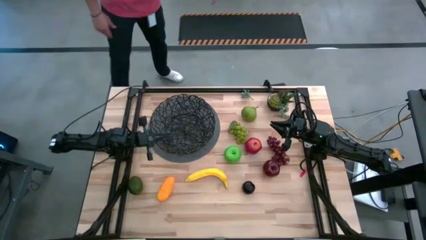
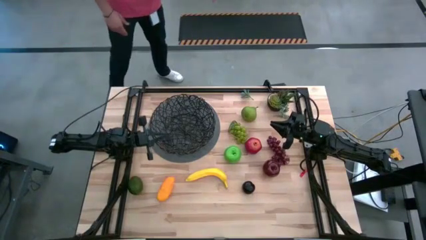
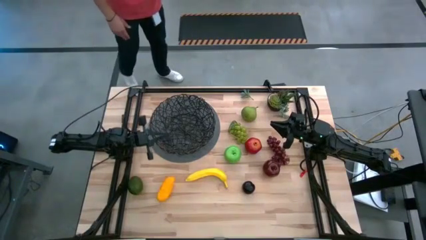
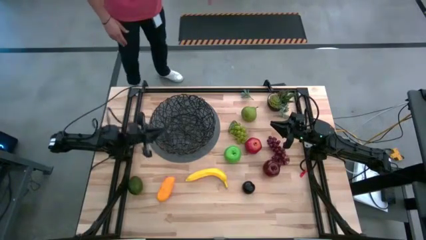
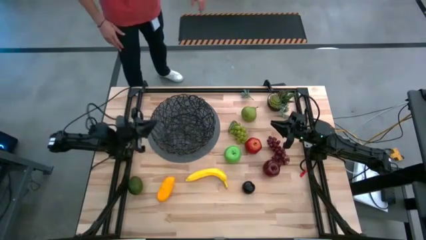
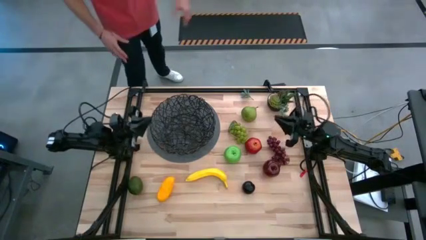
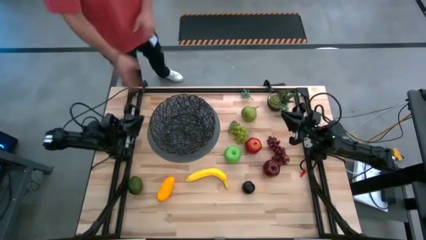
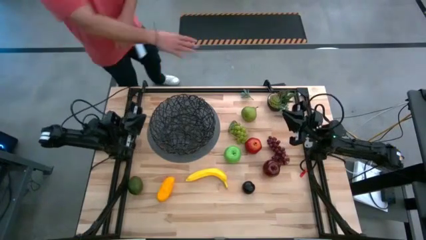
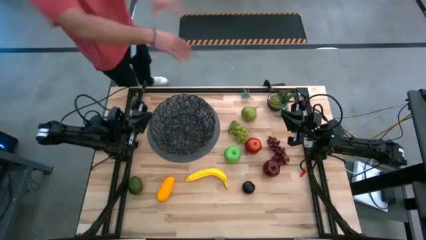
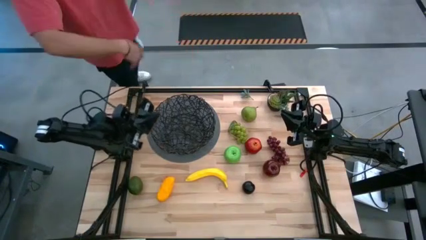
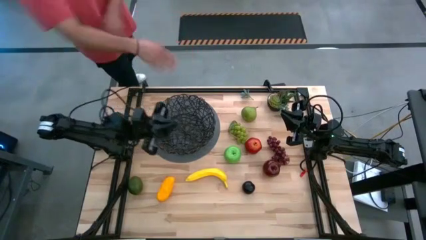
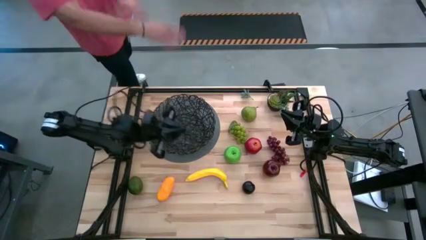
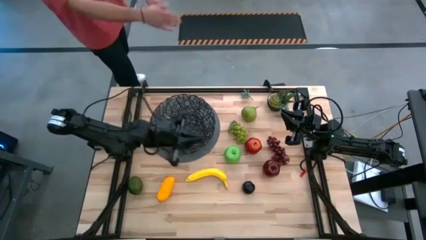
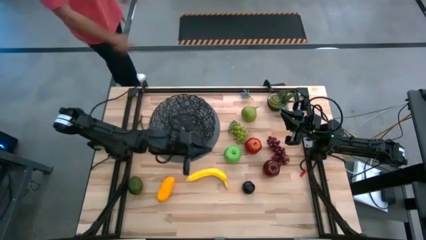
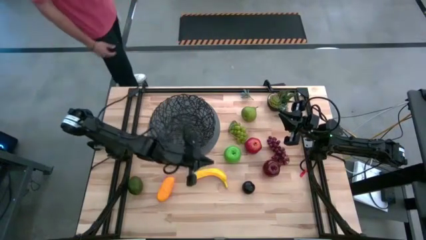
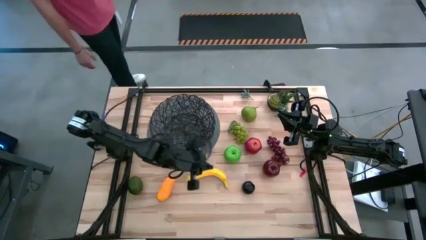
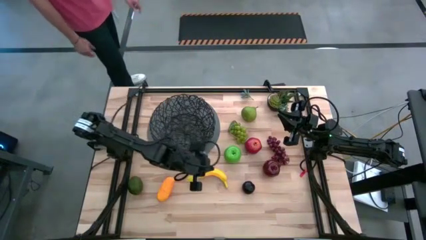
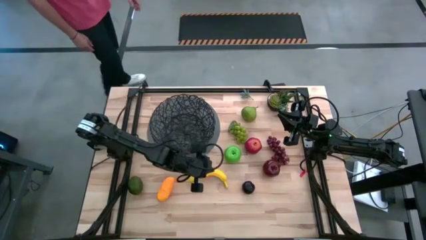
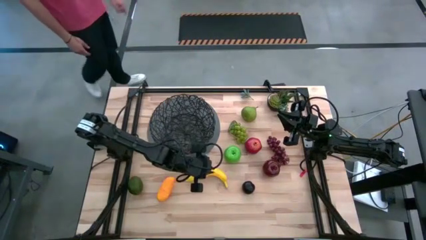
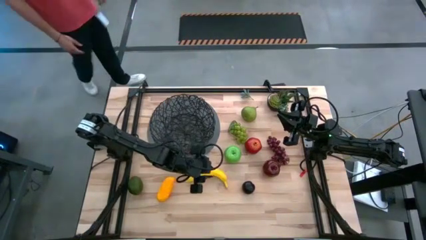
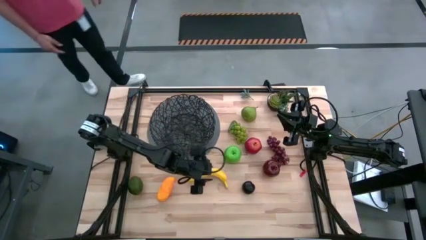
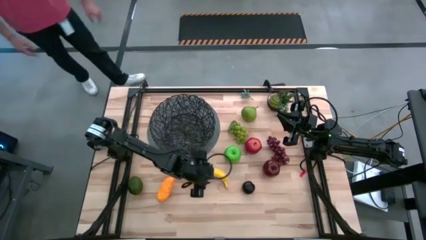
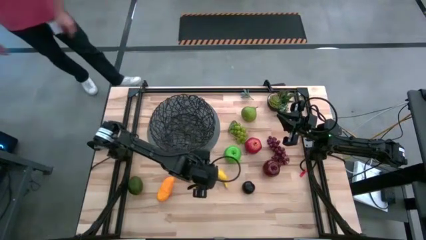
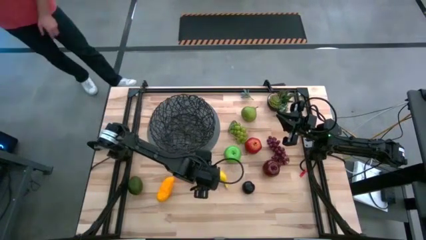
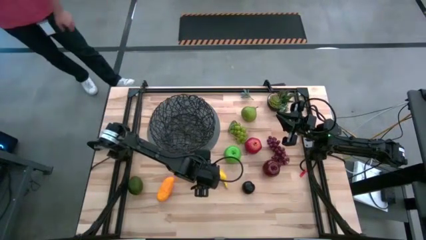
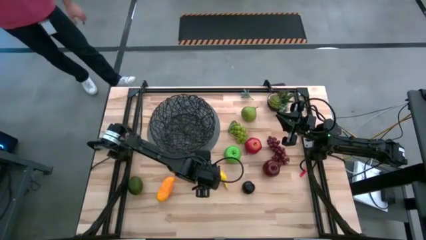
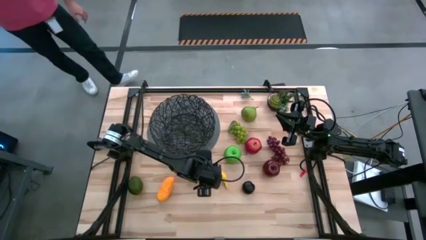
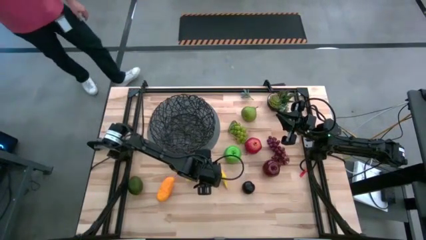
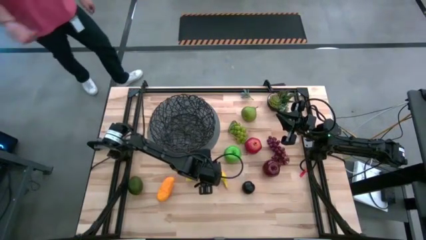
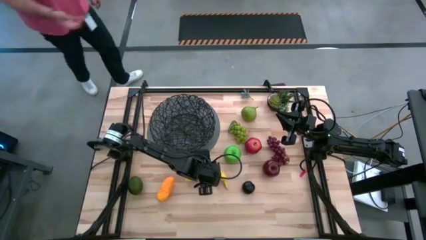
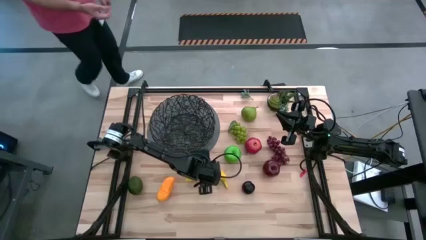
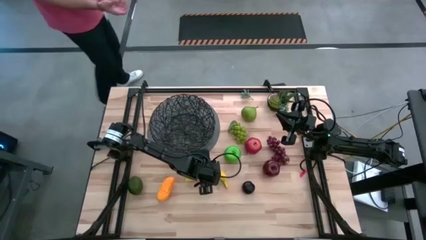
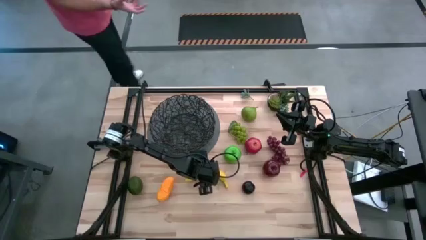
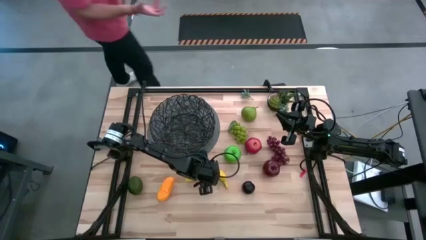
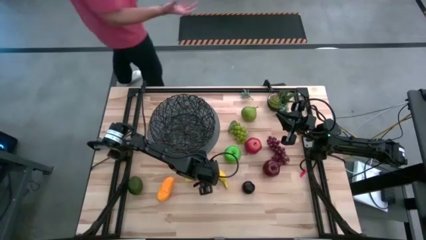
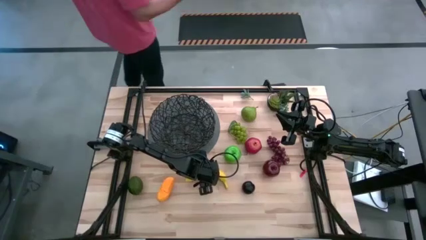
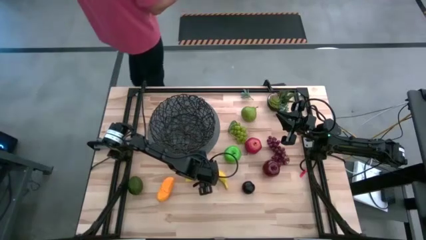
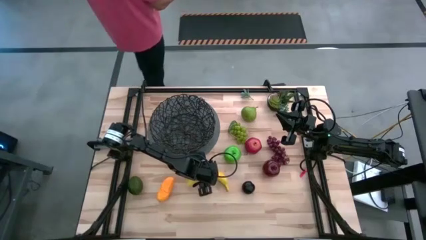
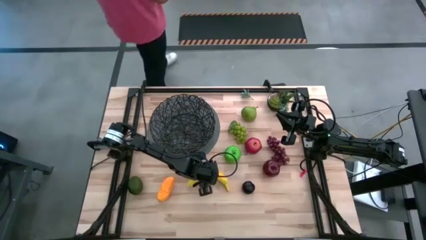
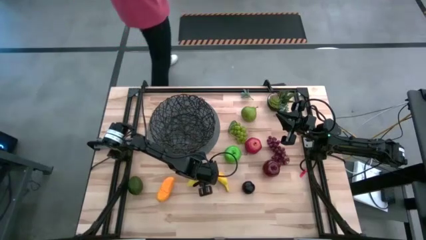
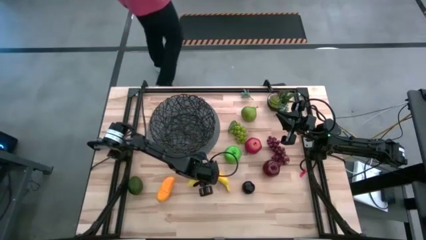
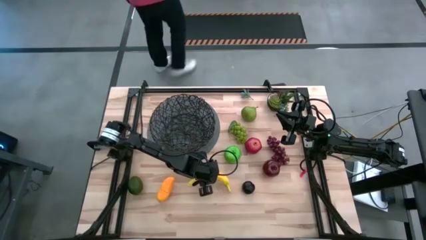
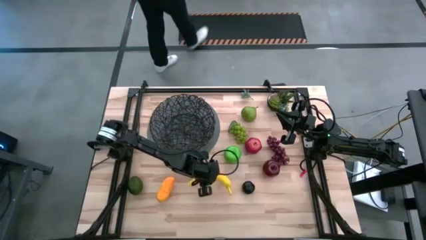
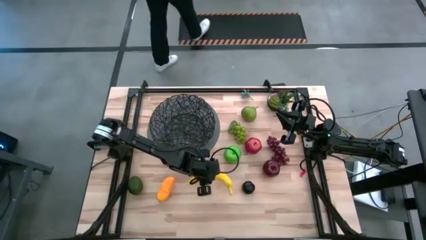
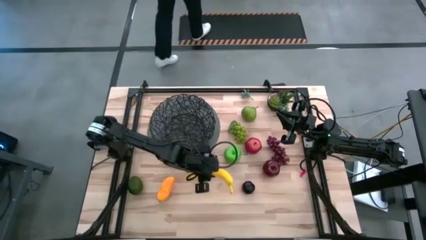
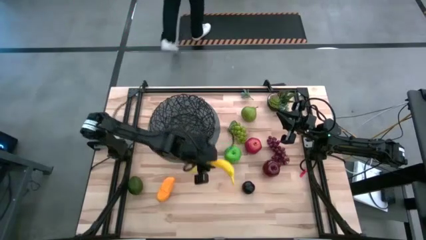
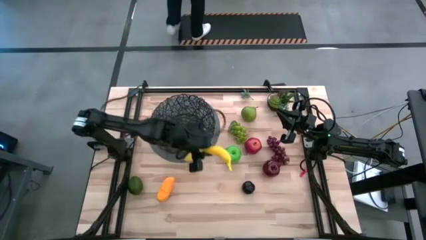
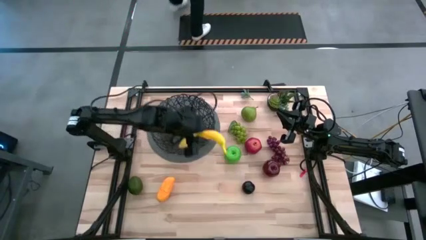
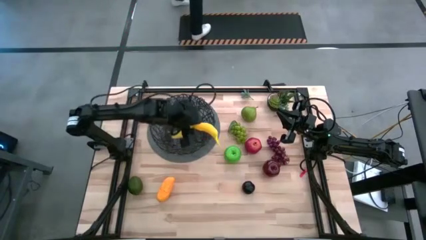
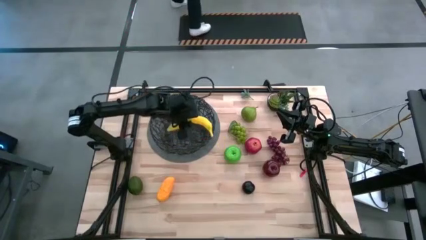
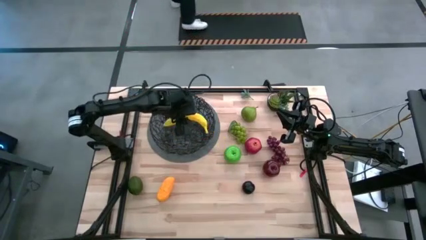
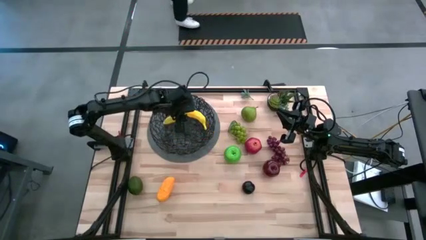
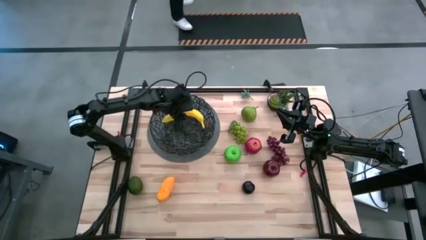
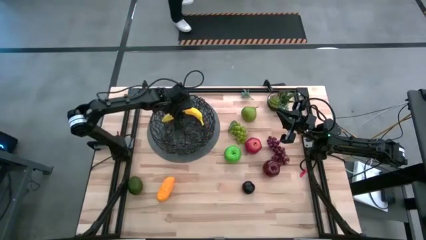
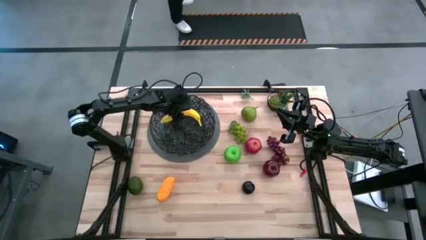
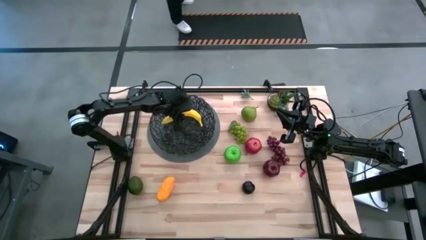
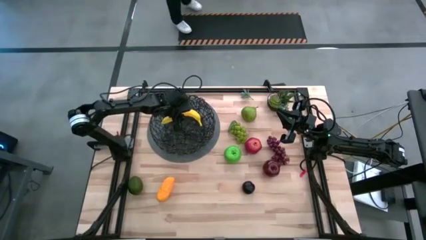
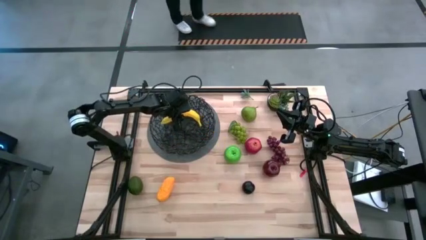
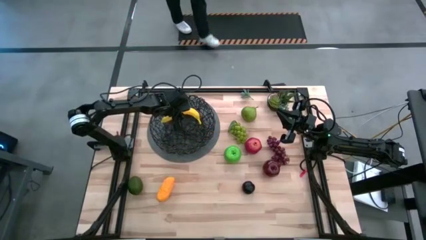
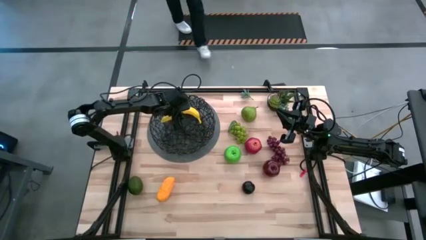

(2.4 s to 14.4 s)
Task: Build produce basket
Put the yellow banana into the basket
